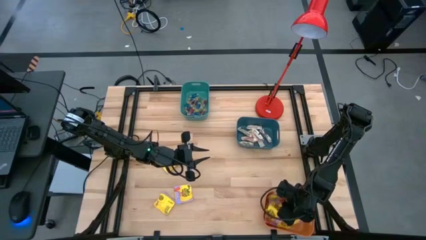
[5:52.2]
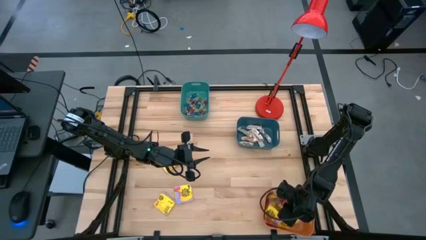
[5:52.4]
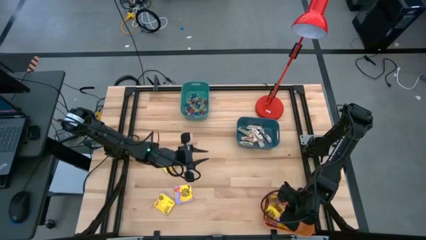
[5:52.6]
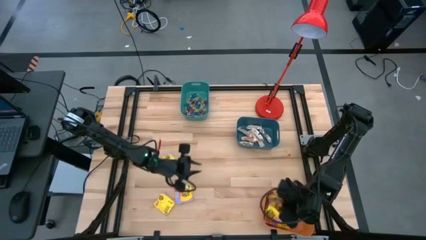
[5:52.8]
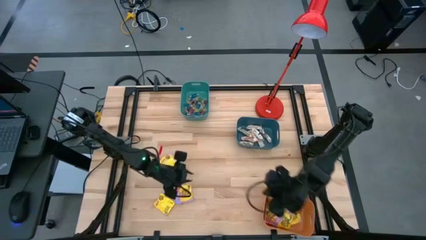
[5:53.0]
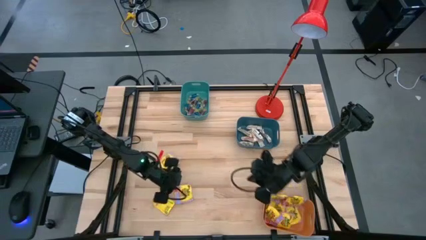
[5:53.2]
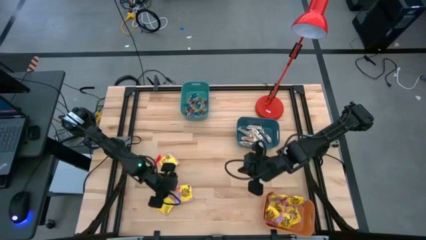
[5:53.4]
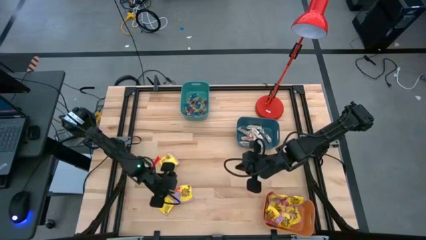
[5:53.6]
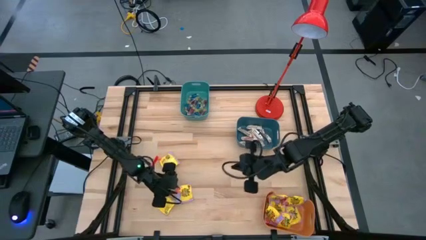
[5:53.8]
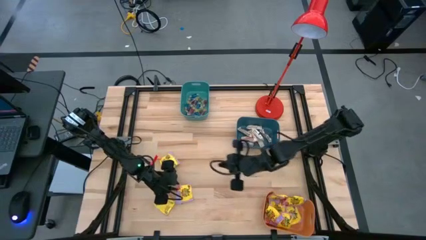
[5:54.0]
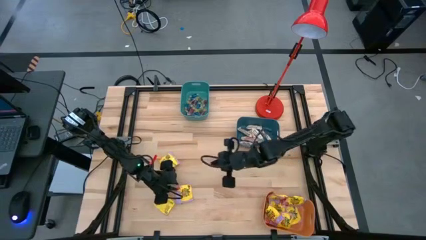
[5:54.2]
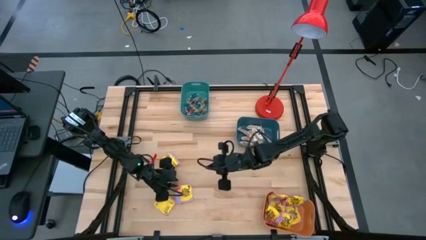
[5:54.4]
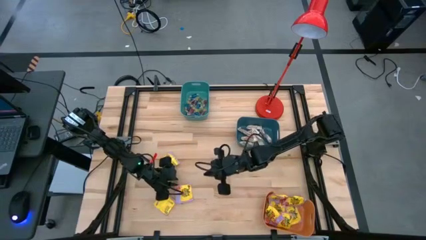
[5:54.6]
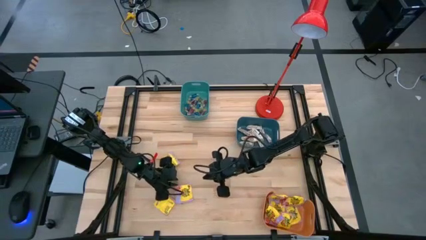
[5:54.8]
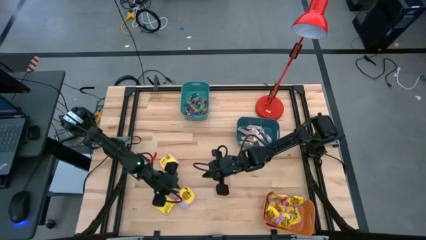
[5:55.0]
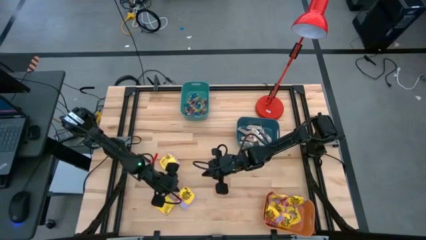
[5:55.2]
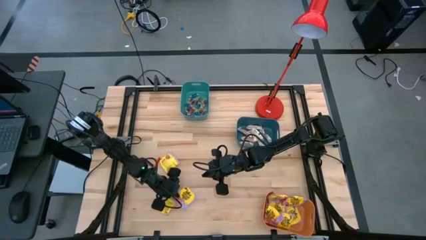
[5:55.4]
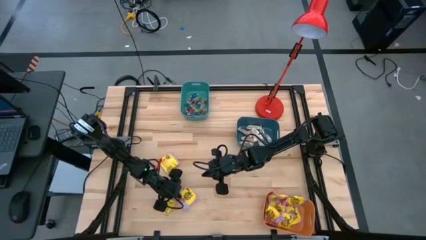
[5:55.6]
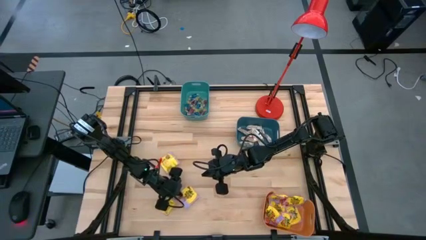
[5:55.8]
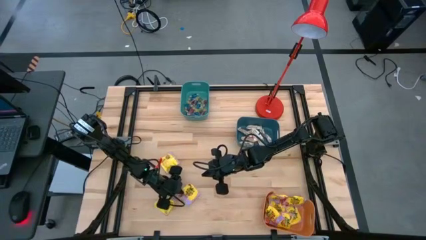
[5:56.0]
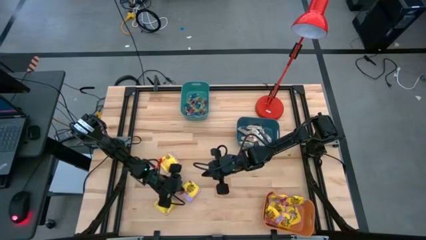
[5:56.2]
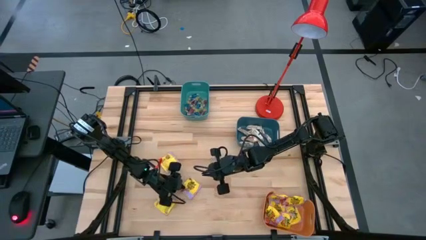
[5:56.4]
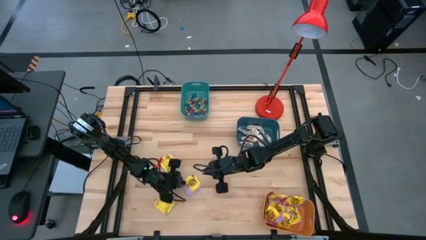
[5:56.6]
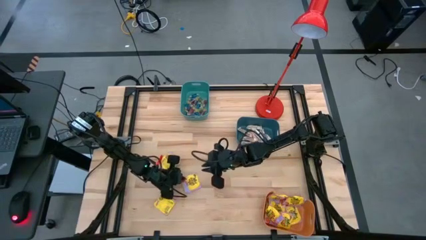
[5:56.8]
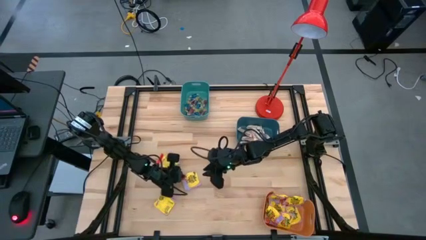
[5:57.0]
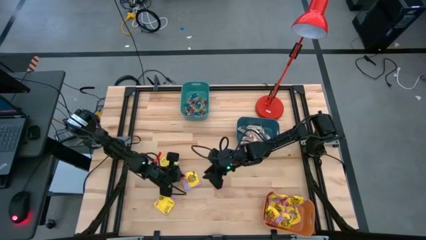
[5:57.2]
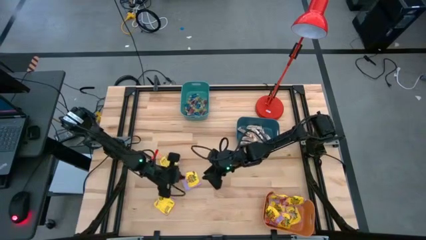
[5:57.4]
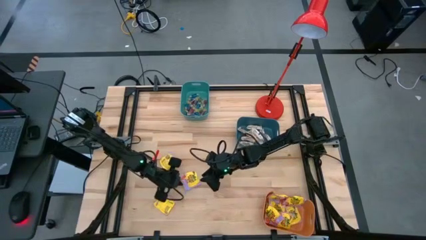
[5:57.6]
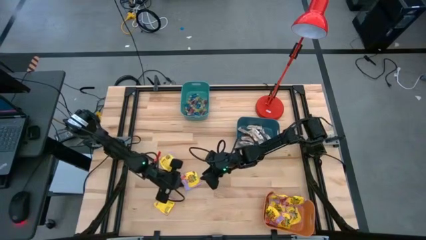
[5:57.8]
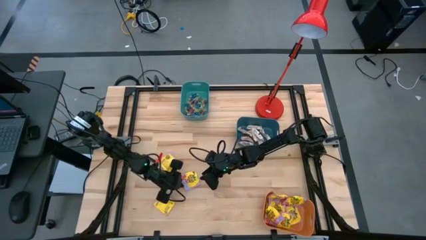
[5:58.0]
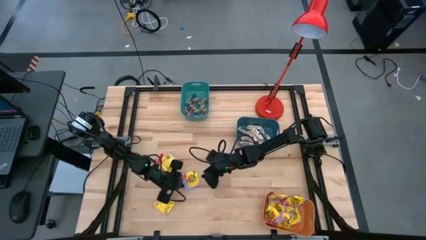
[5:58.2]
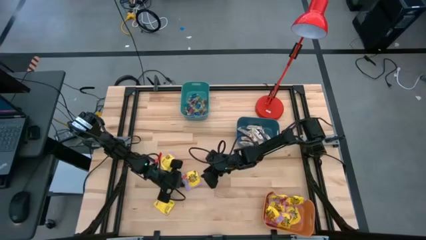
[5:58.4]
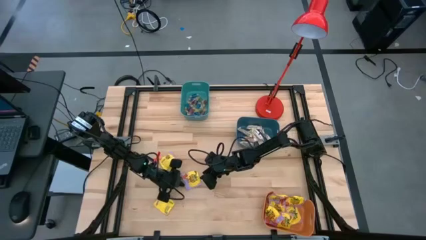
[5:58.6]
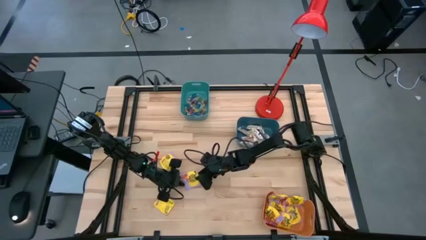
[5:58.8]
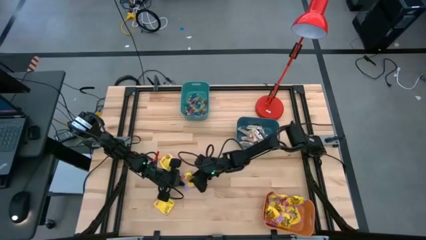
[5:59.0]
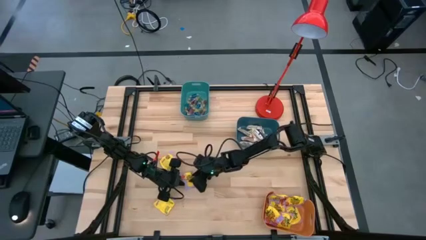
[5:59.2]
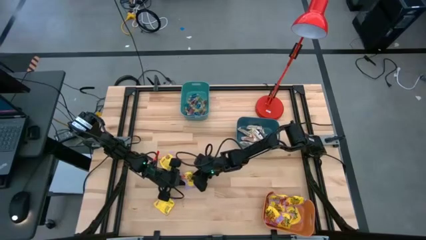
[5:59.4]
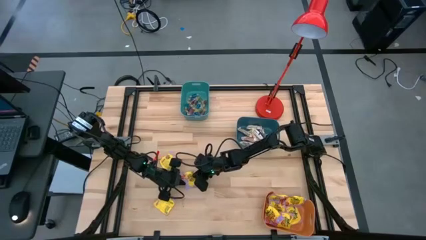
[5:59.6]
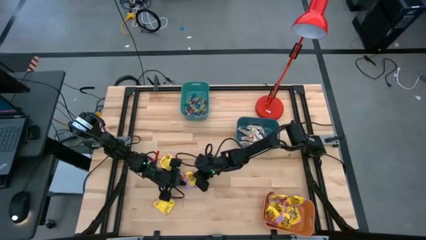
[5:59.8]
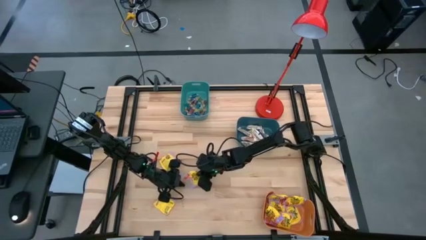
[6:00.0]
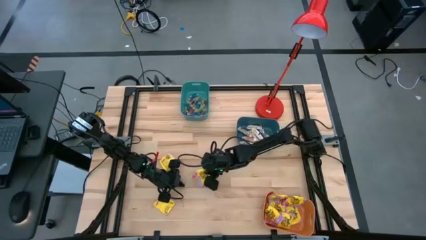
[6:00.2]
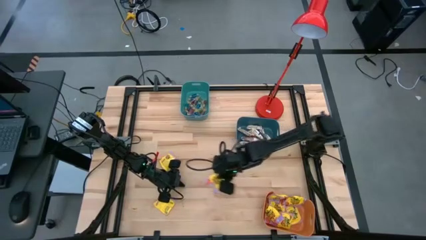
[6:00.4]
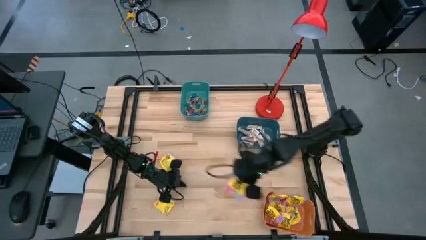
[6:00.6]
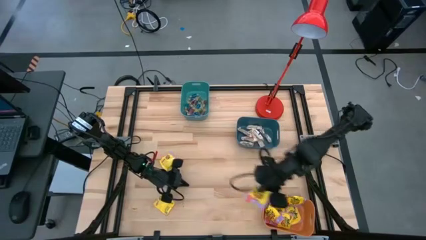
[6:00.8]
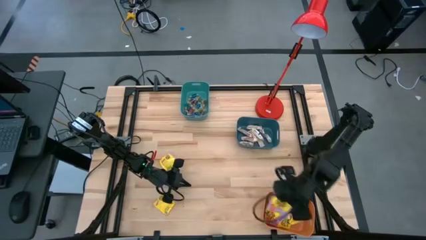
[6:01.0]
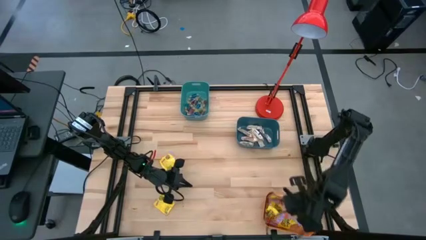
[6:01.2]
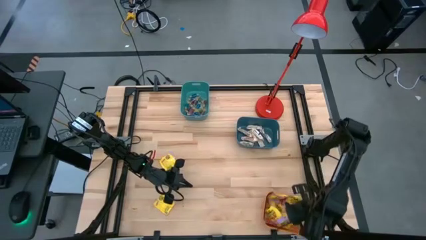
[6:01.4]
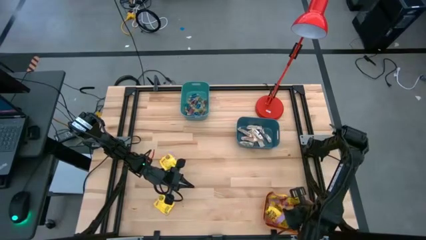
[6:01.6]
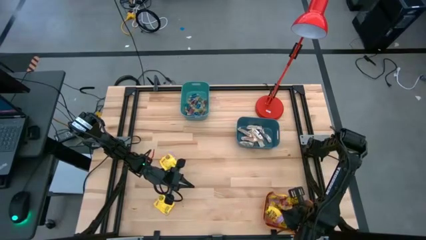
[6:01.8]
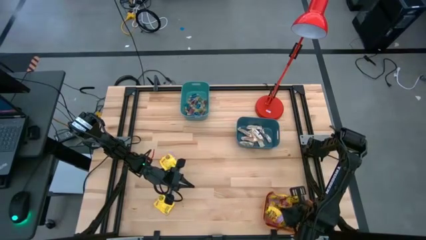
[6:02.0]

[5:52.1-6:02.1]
Task: Sort candy
Put the yellow candy bag into the orange bin

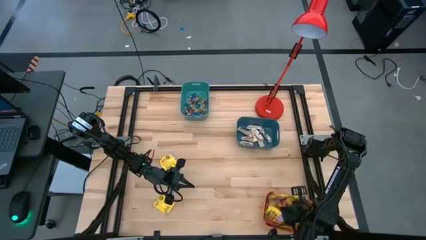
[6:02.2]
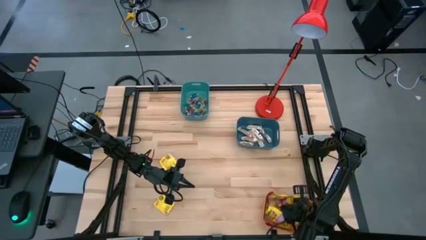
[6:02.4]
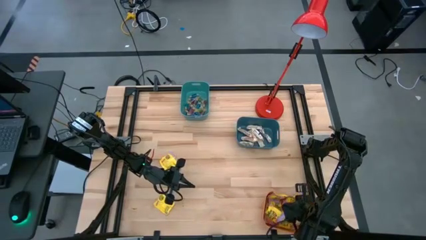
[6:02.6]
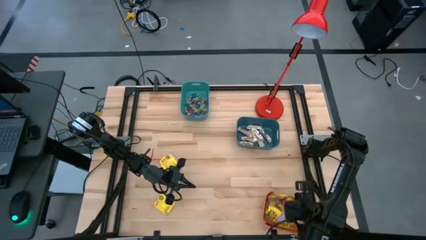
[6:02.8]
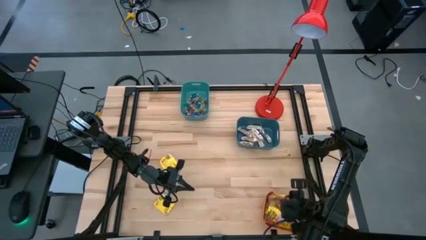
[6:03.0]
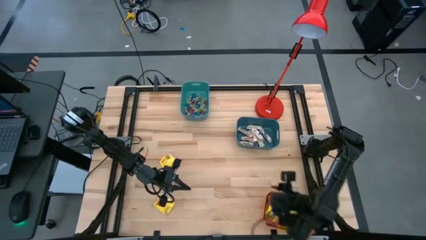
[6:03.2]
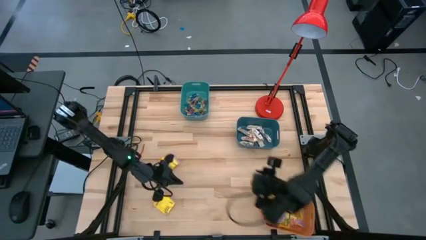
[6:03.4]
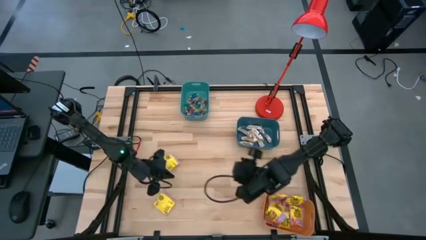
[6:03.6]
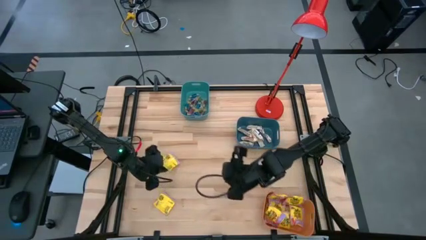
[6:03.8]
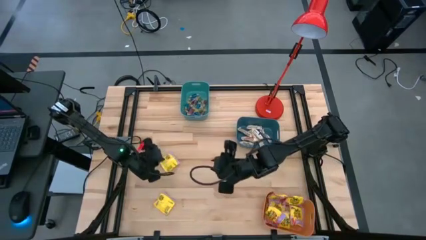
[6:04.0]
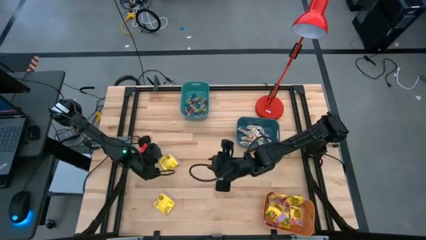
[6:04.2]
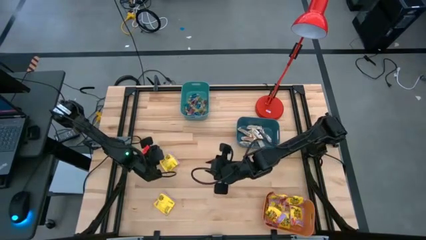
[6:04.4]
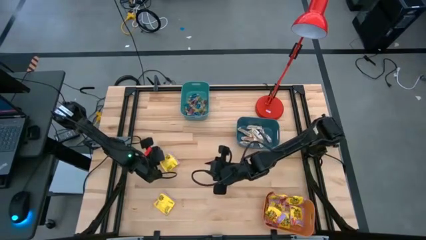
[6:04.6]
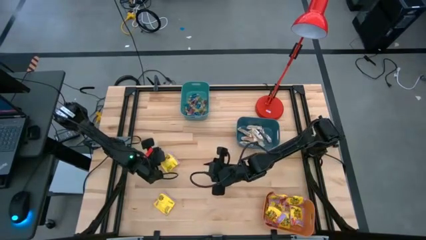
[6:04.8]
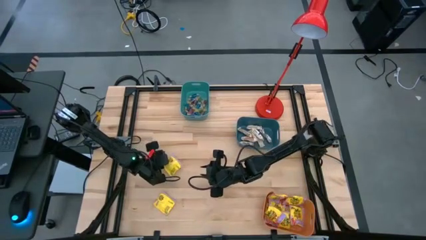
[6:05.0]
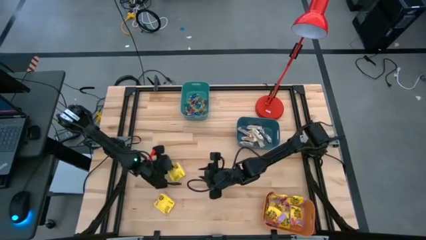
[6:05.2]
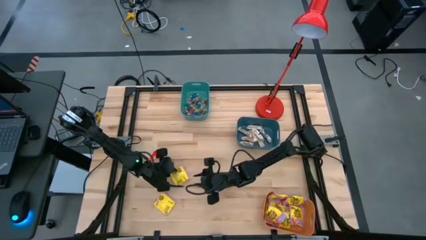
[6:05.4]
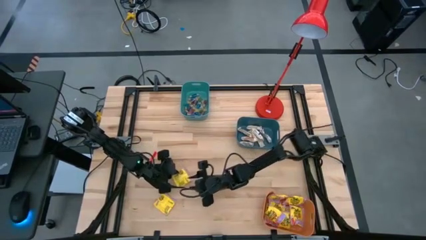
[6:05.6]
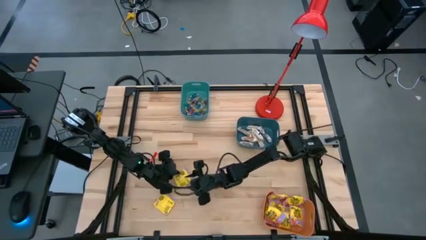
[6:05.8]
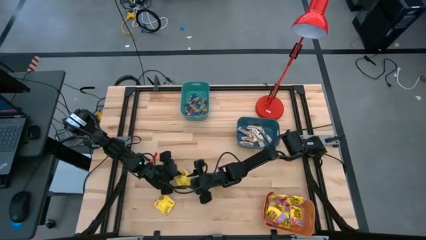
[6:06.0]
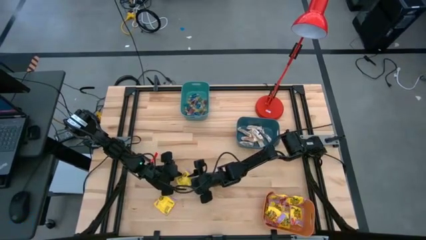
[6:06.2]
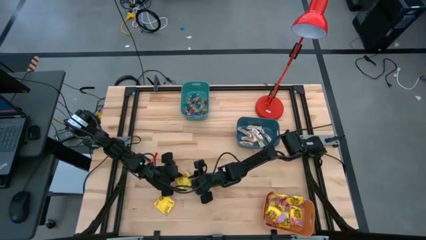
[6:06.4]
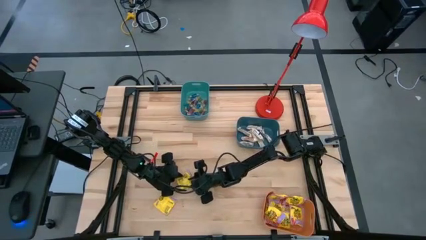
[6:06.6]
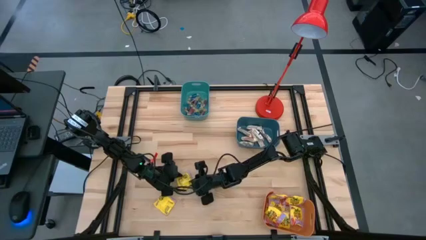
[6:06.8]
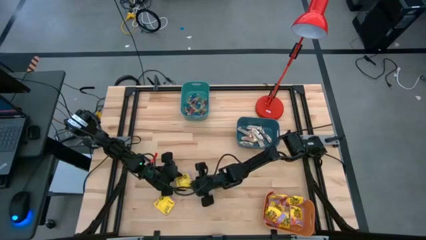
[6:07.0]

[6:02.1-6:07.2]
Put the yellow candy bag into the orange bin

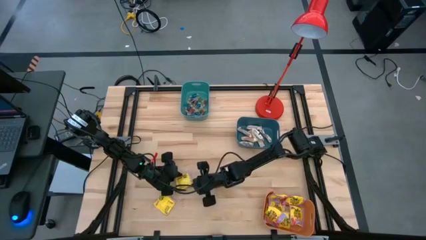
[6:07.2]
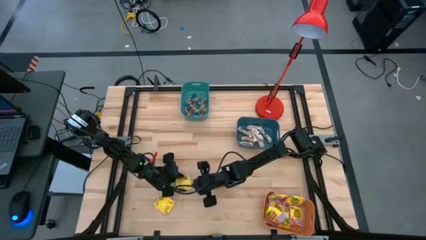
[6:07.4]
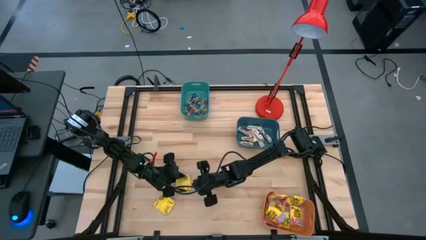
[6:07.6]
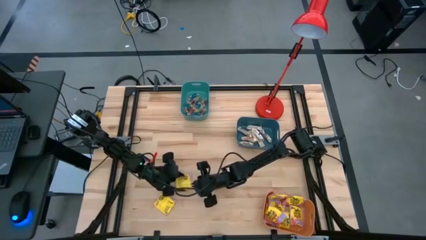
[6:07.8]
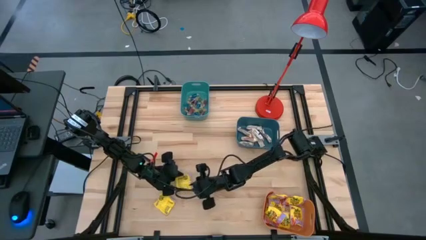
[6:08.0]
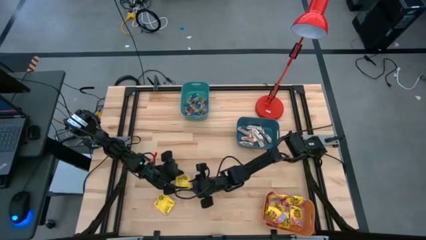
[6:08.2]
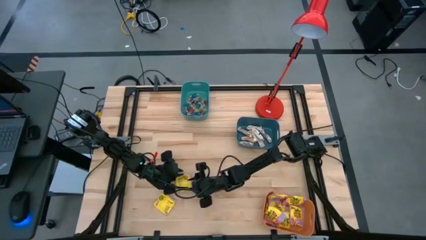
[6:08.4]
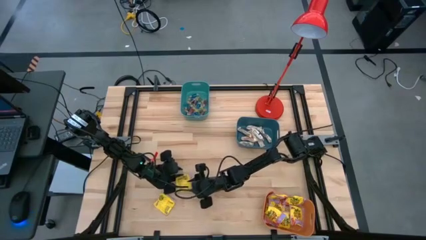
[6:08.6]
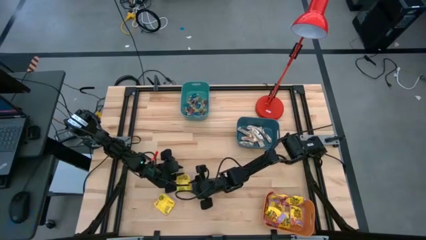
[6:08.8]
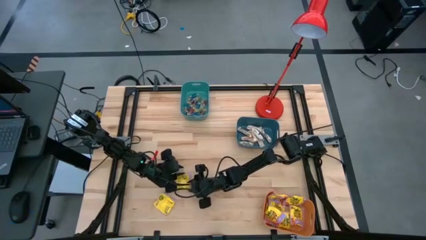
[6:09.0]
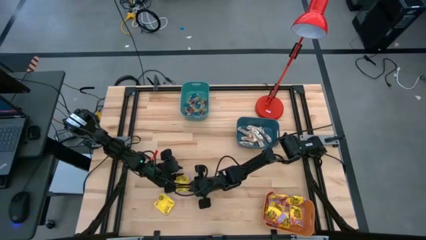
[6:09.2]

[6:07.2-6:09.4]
Put the yellow candy bag into the orange bin
